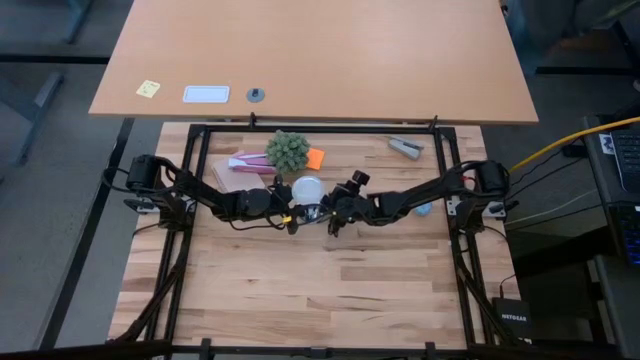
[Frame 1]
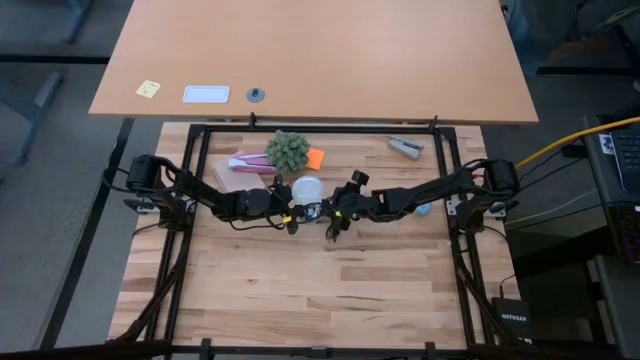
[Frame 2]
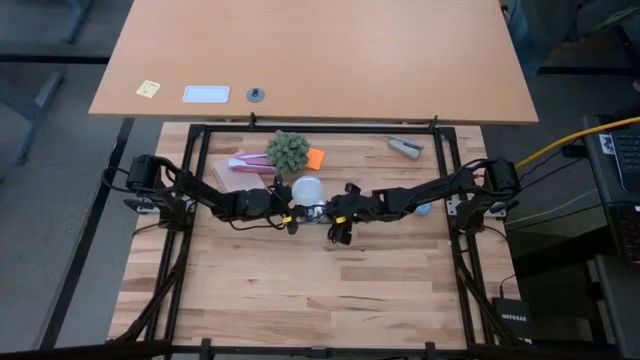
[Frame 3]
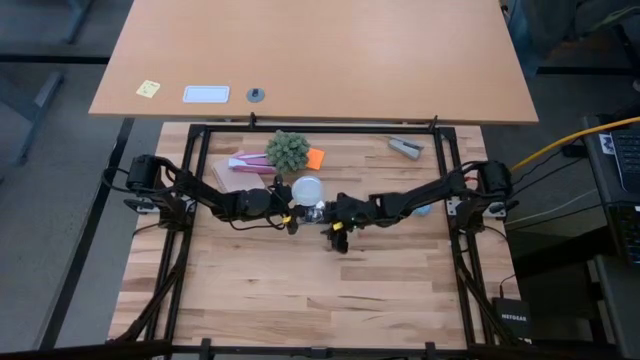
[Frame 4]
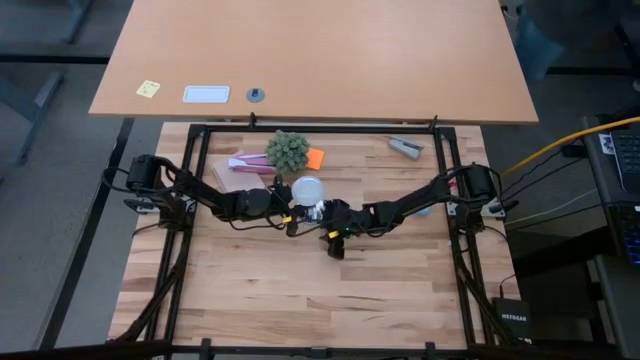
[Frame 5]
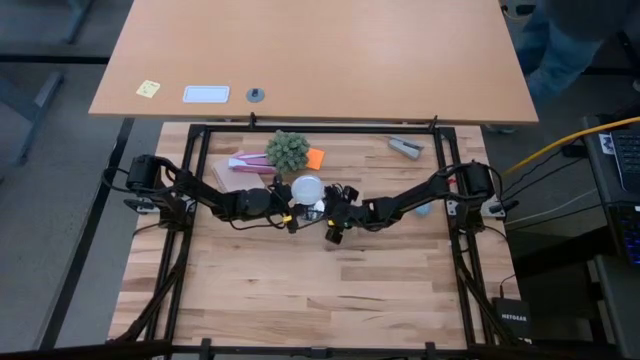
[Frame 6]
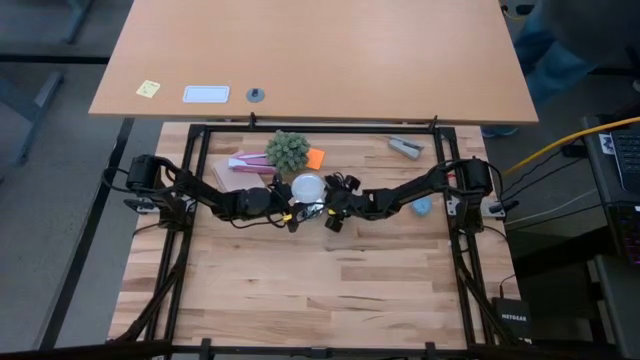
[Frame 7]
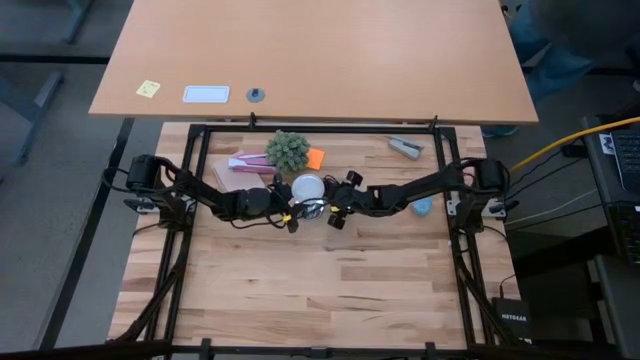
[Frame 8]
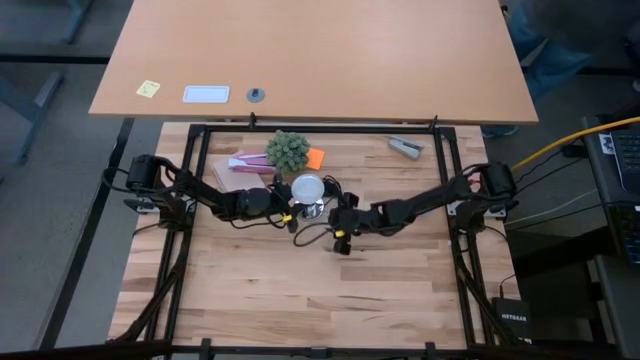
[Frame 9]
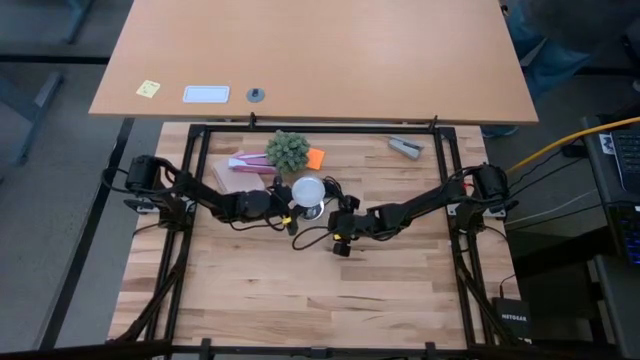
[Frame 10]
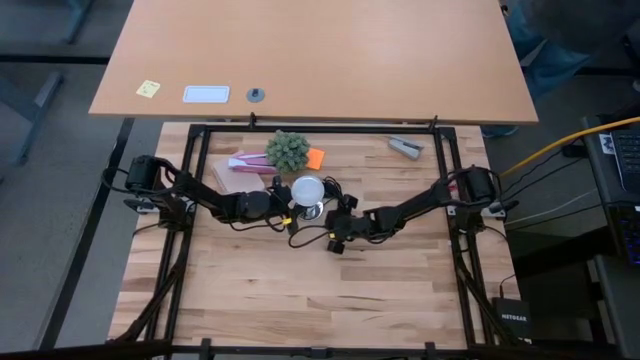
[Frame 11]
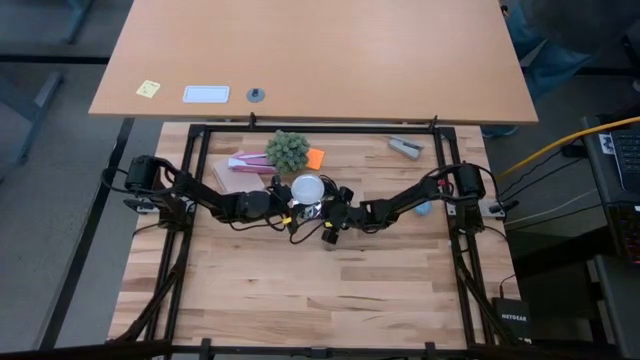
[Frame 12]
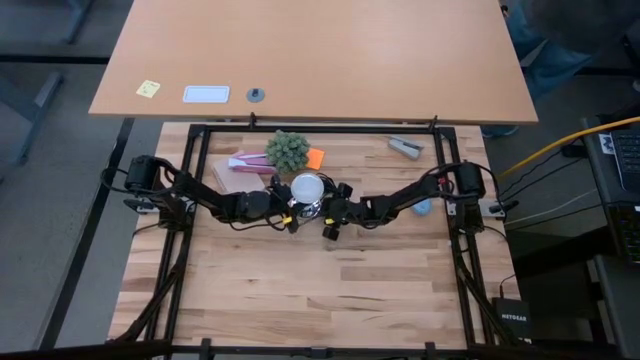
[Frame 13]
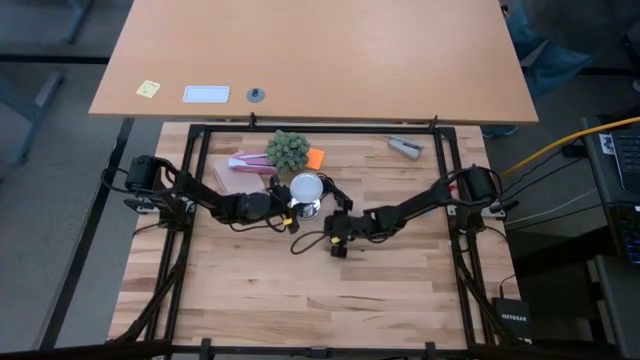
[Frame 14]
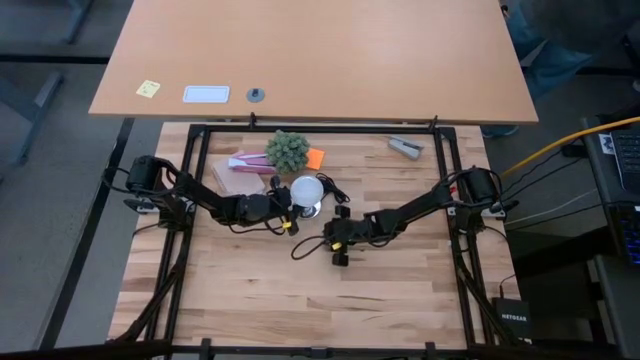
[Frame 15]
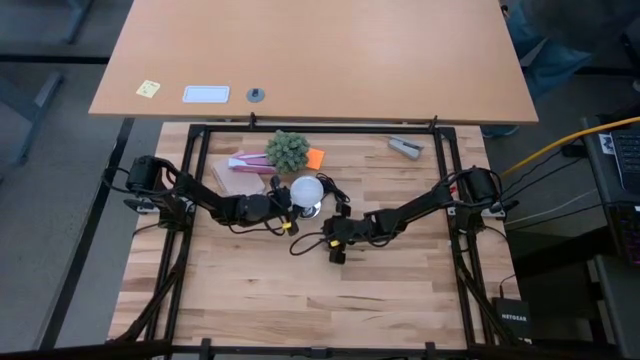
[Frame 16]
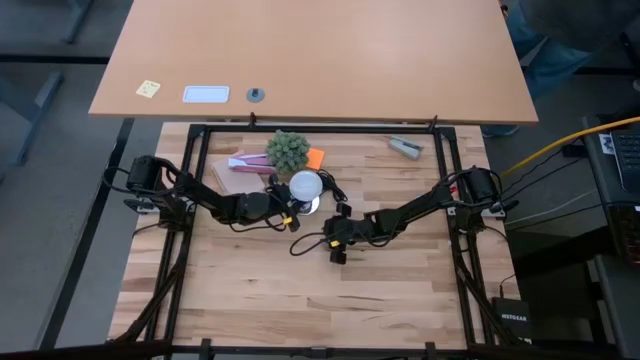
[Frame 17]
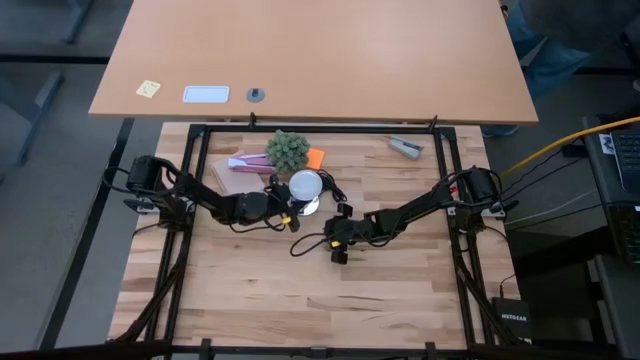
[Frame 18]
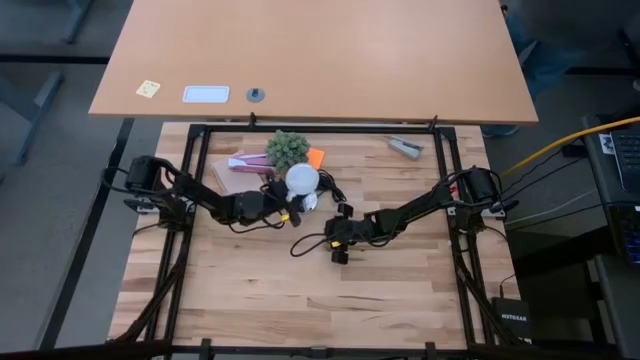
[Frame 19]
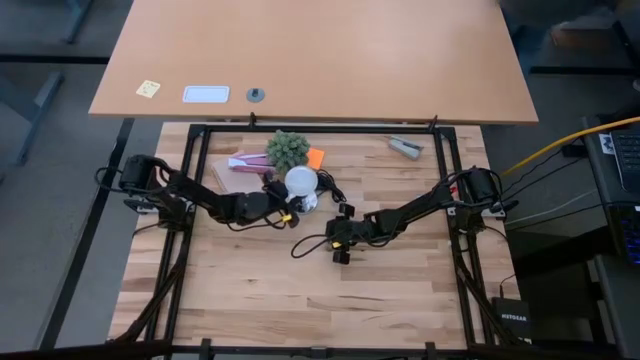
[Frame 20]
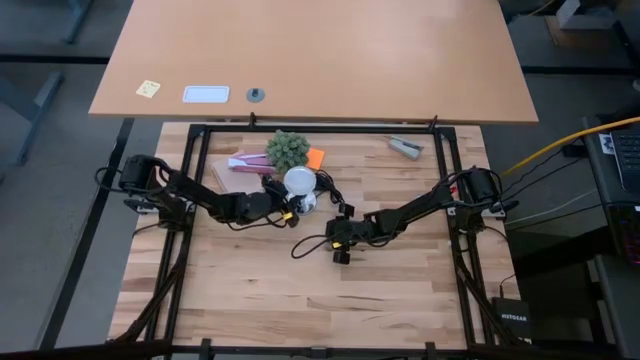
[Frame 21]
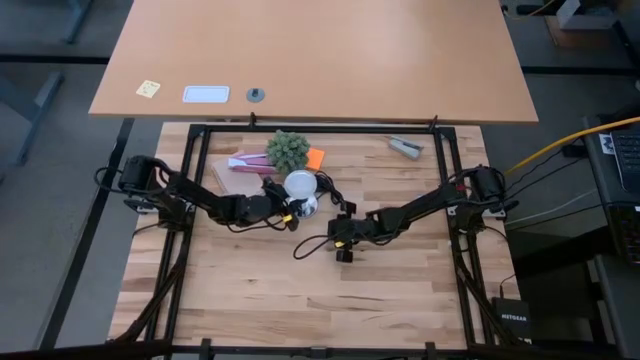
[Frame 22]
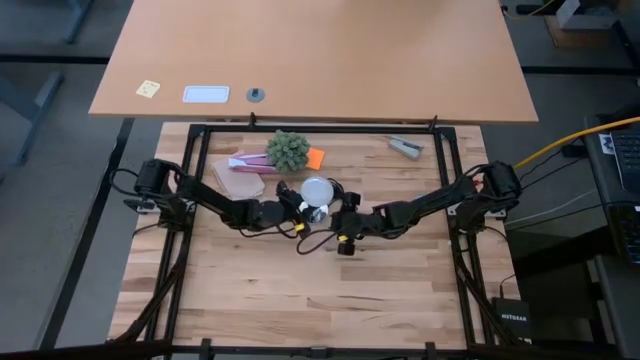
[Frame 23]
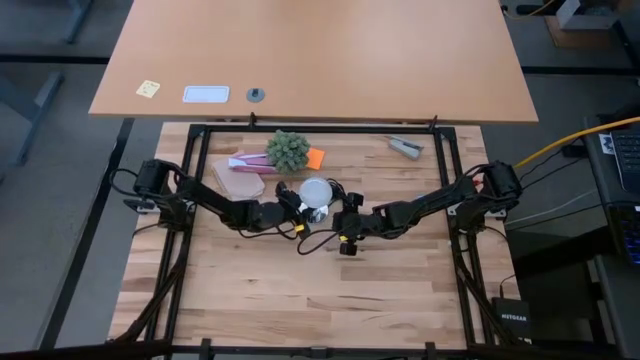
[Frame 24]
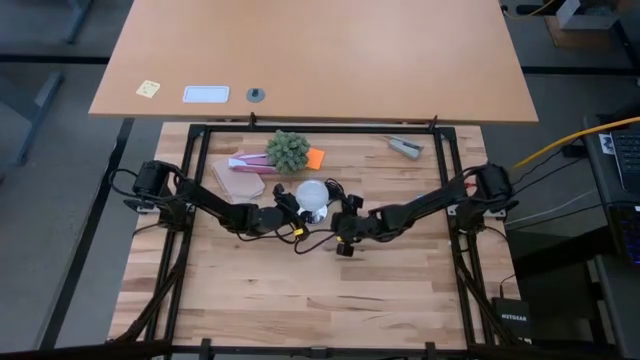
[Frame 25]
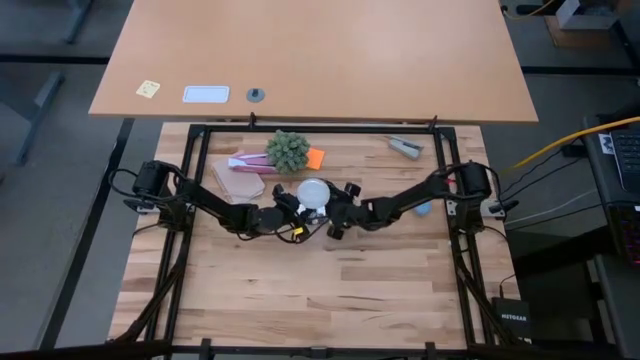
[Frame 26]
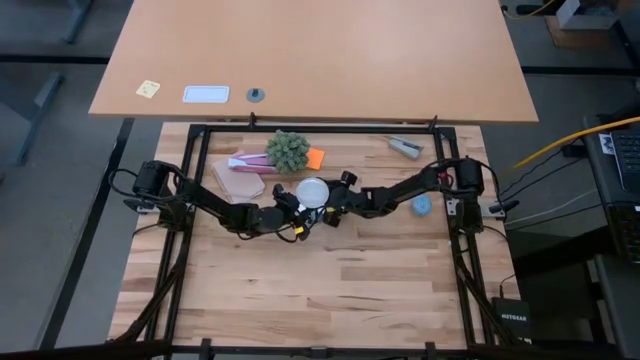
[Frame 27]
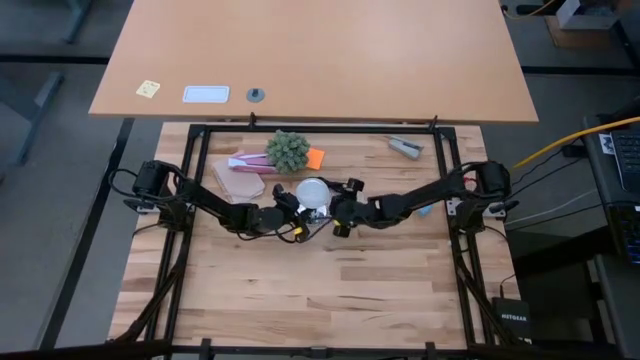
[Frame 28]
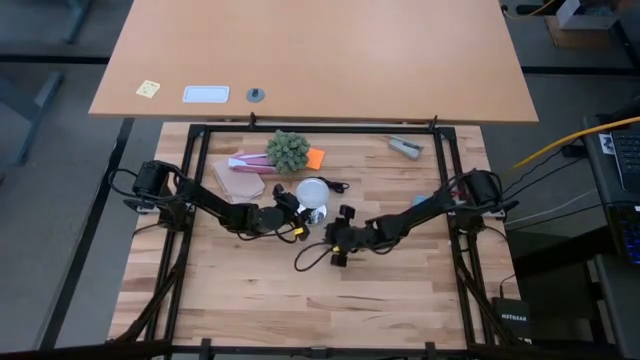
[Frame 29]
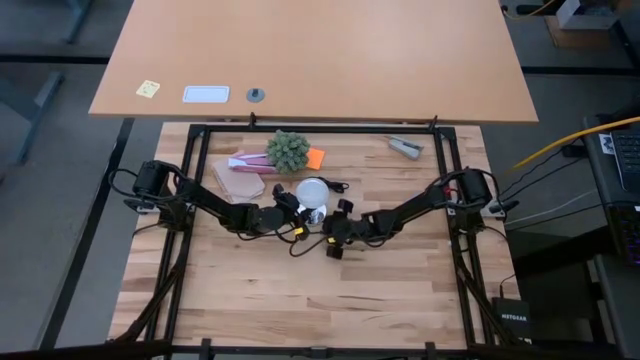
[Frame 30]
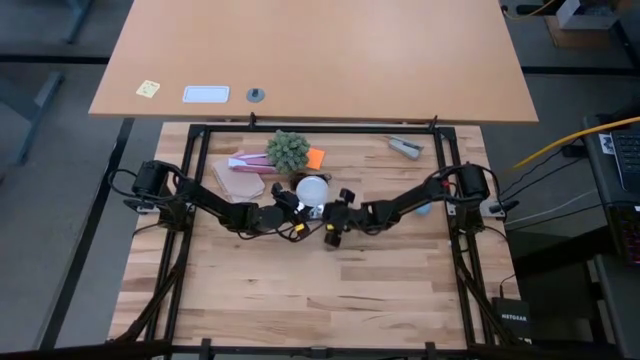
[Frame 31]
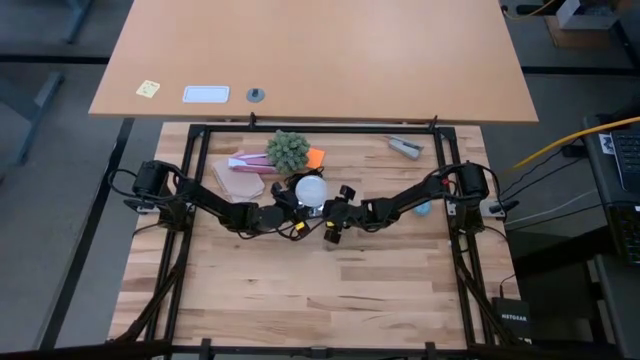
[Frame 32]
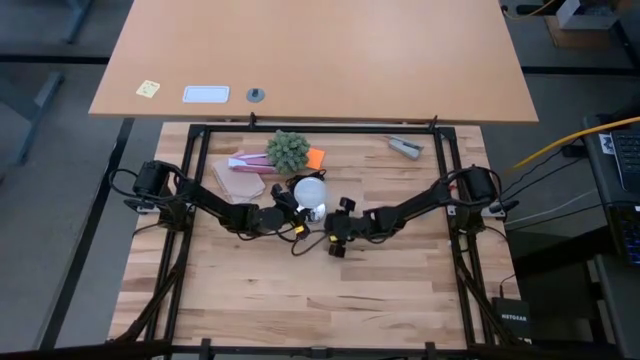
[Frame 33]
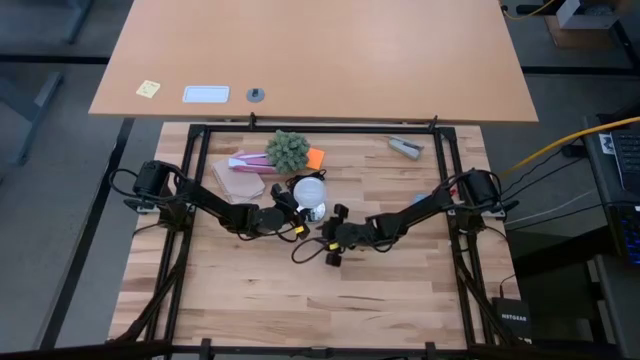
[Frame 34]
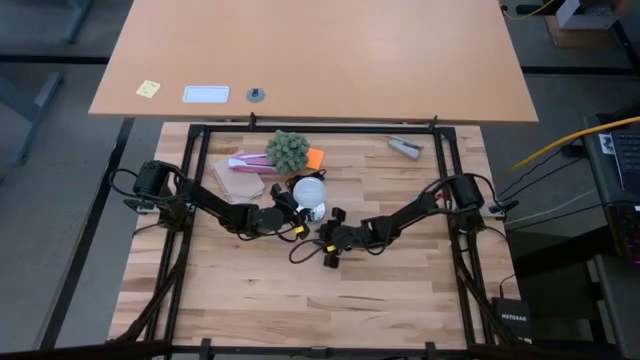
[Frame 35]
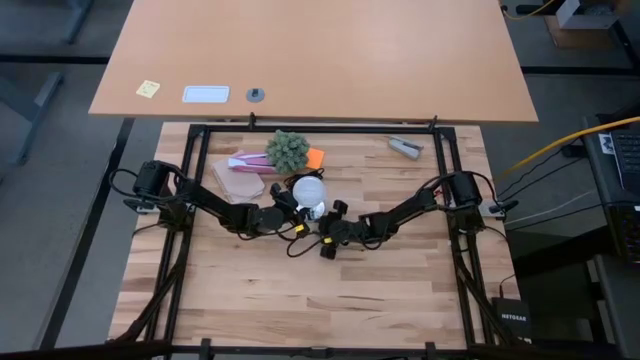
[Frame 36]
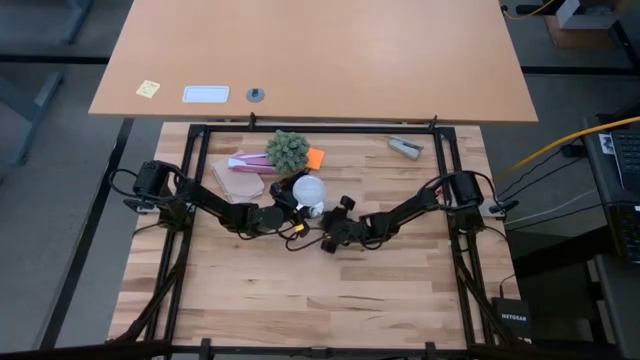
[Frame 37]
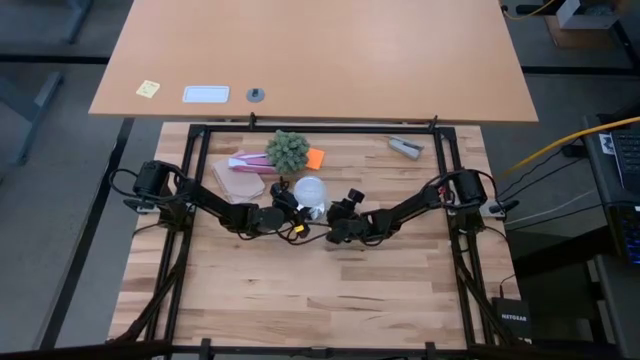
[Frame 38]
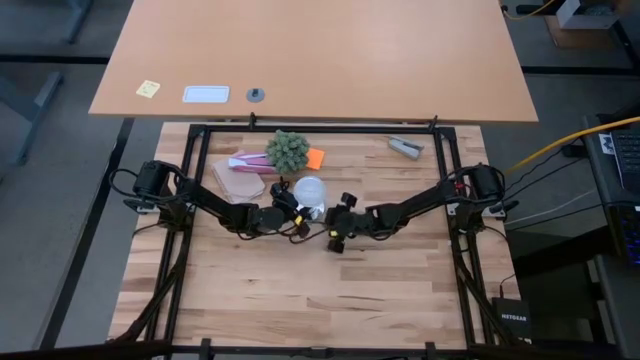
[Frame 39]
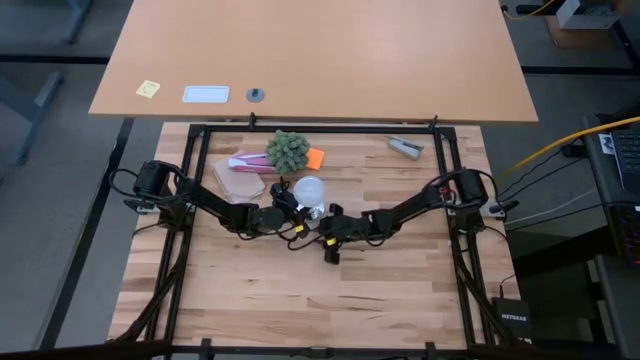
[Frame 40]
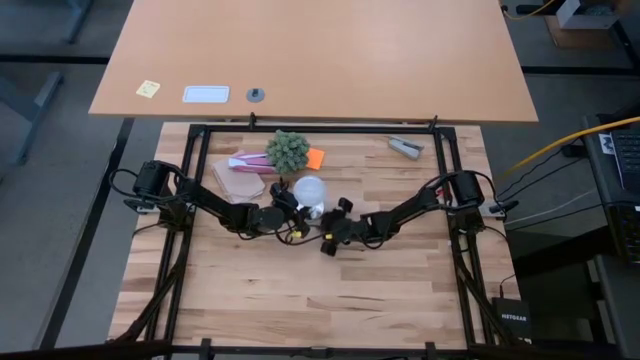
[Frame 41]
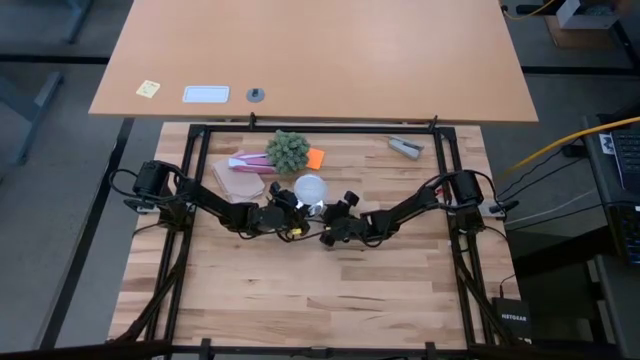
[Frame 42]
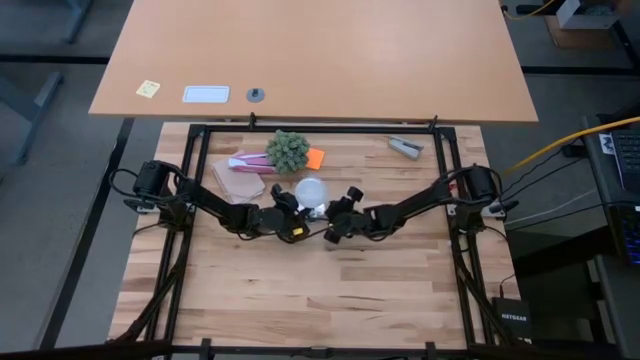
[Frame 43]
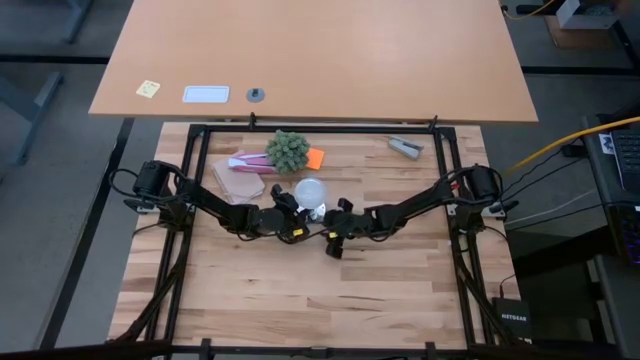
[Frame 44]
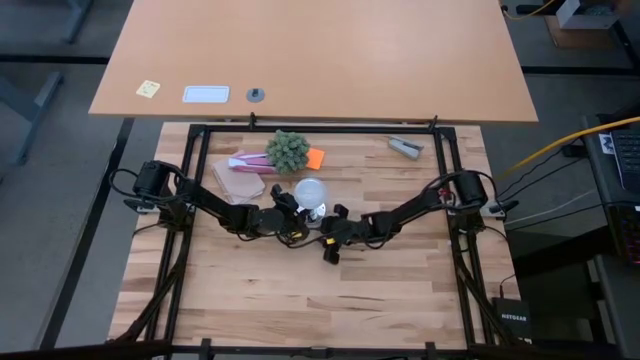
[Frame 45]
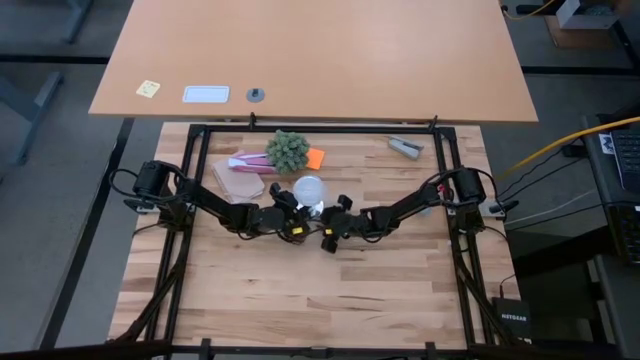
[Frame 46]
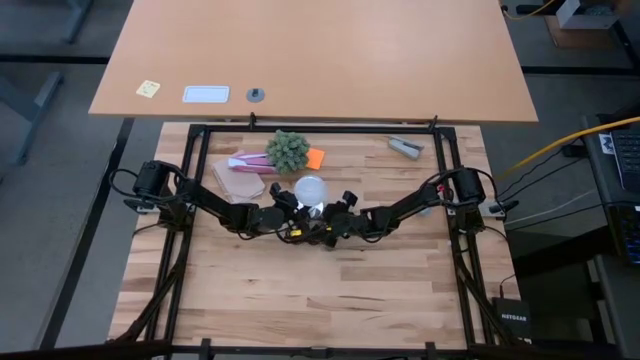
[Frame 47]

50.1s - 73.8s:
Task: Screw lightbulb
Insert the lightbulb into the lamp
